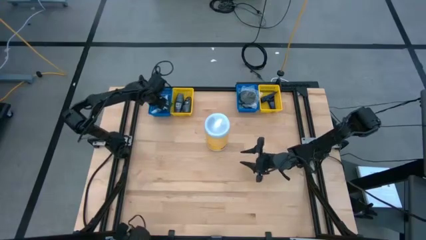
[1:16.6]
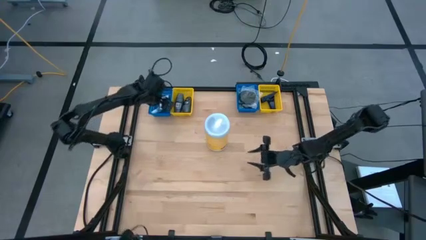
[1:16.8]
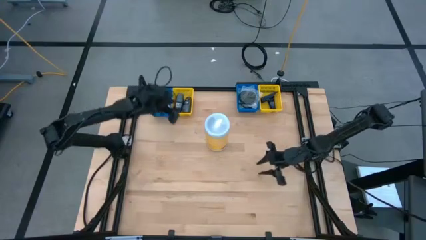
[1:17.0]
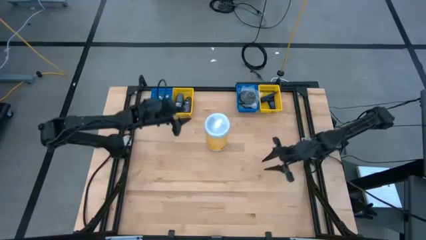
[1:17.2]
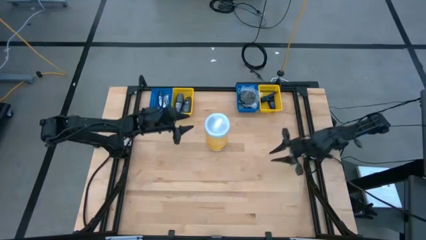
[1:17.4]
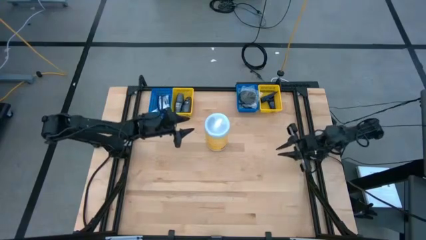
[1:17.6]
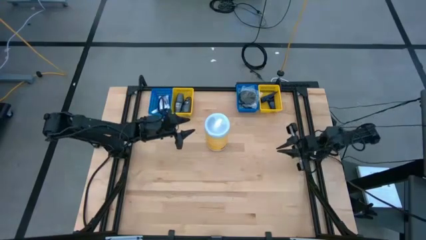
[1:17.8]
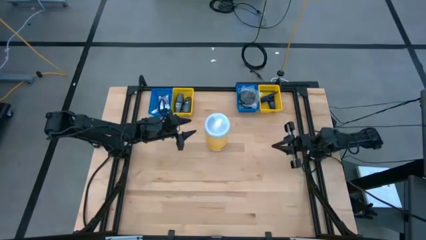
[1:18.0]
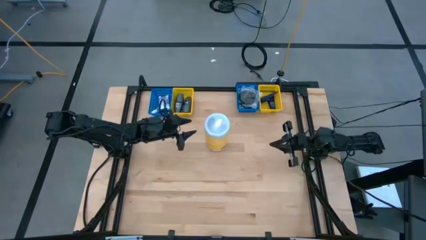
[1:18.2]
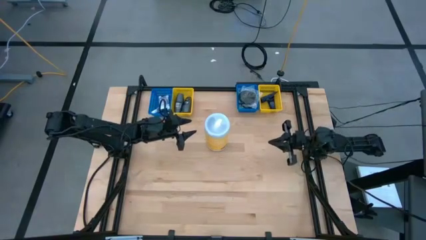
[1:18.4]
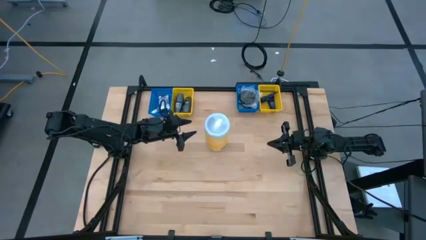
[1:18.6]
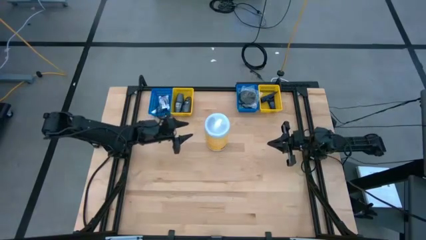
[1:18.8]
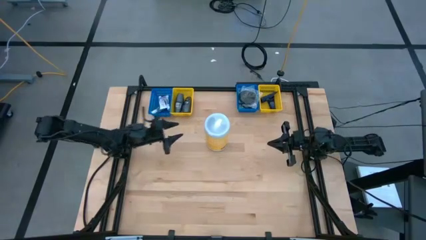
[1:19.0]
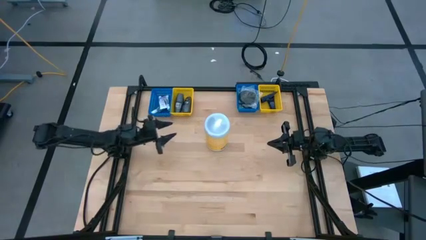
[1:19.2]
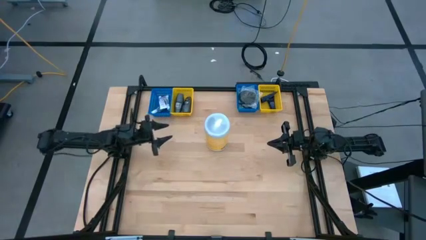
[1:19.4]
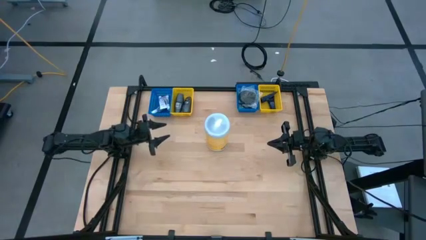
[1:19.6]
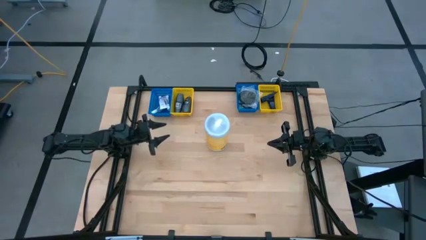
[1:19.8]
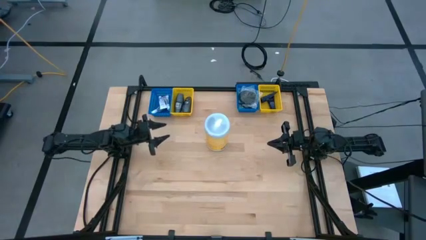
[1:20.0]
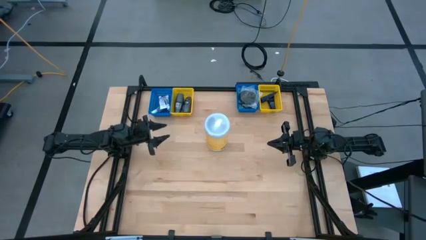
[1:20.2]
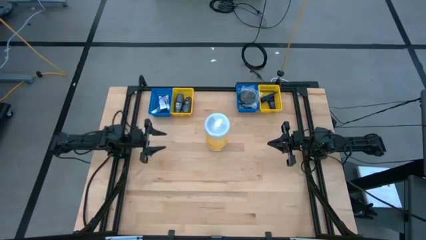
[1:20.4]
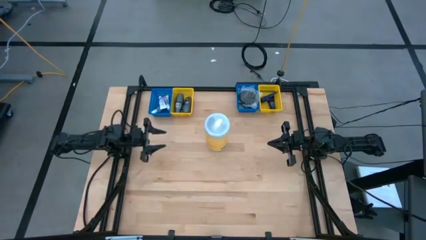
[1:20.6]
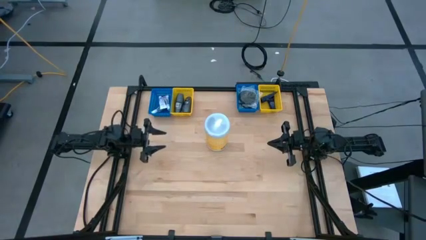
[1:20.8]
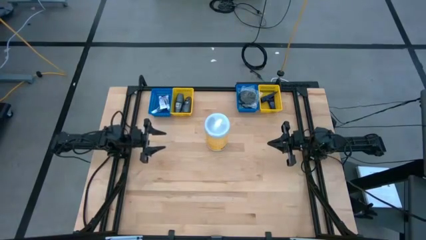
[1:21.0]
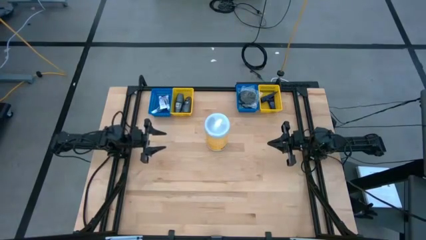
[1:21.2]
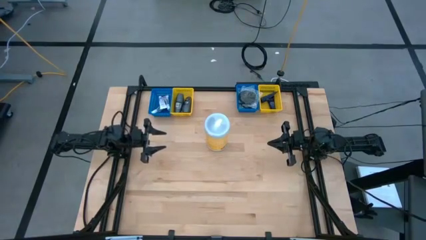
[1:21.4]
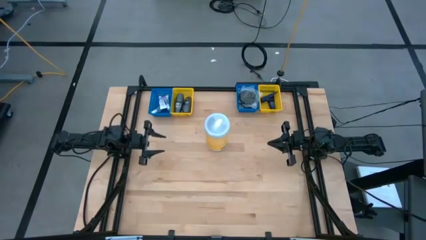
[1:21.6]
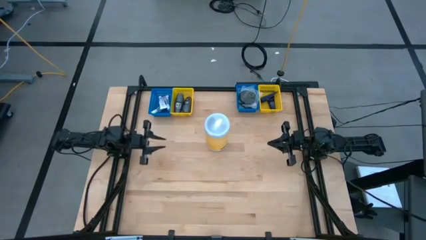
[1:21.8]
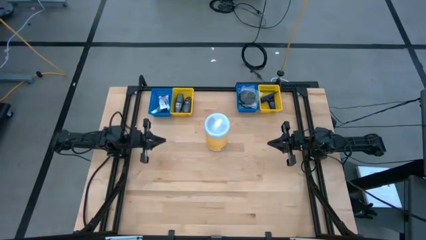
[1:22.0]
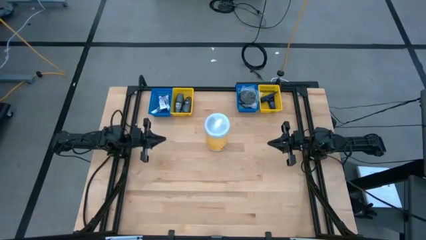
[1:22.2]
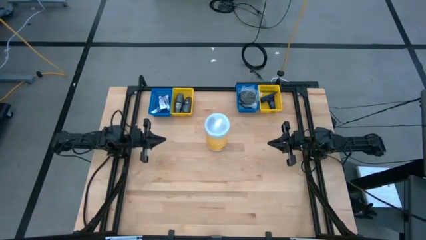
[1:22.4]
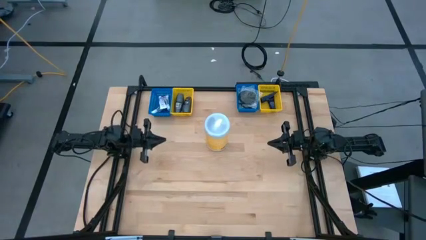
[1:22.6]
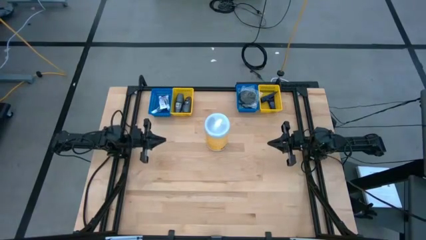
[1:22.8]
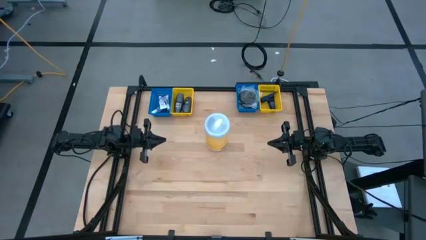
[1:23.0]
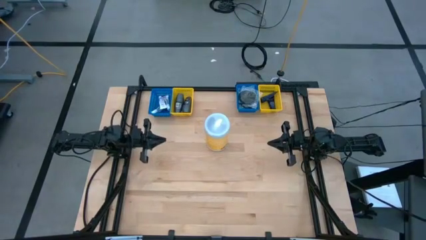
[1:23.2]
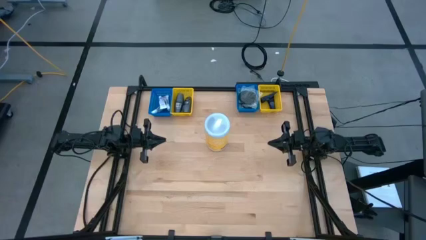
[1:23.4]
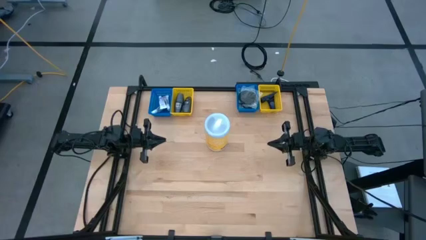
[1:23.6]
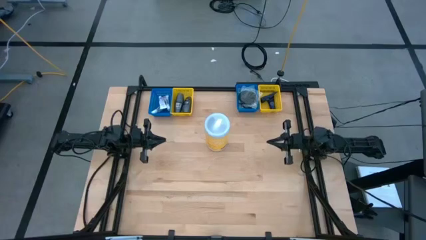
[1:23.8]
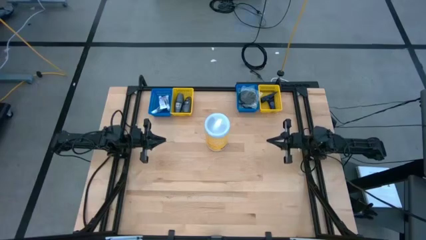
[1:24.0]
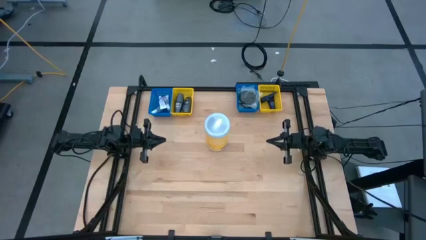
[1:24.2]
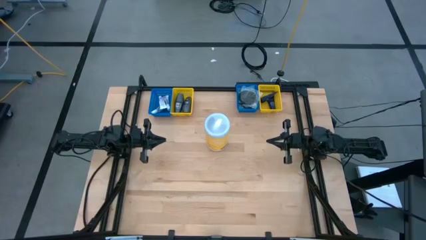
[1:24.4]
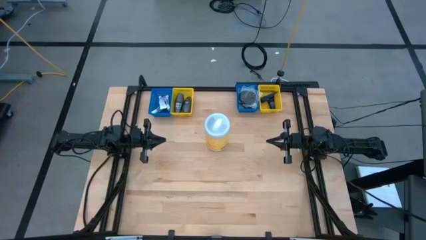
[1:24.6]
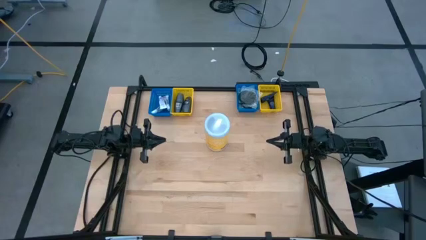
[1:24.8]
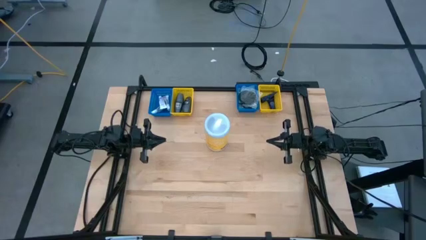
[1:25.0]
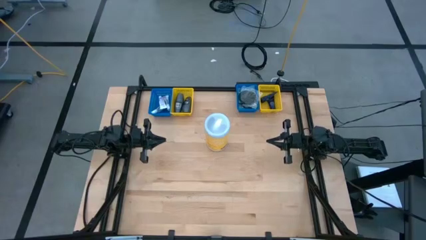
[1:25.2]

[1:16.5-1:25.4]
Task: Pick & Place Travel size toiletries
Return to Home Position

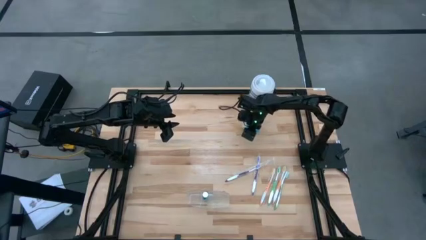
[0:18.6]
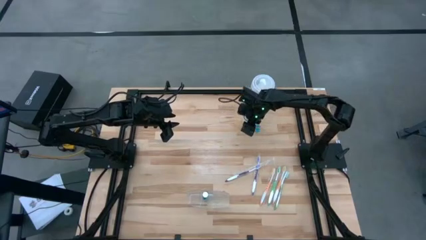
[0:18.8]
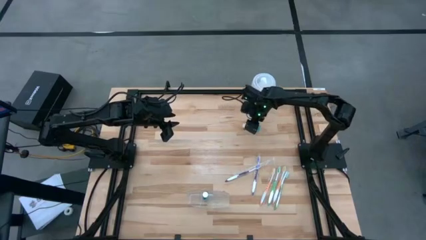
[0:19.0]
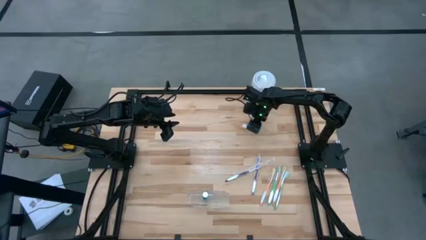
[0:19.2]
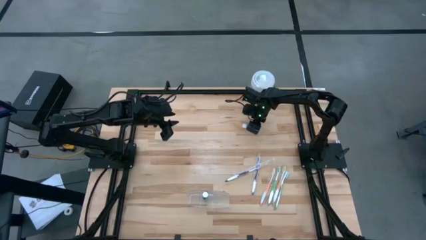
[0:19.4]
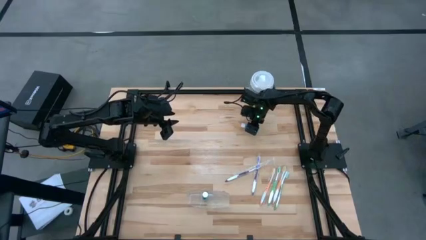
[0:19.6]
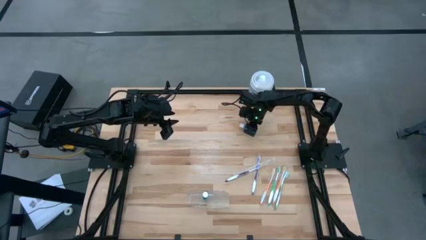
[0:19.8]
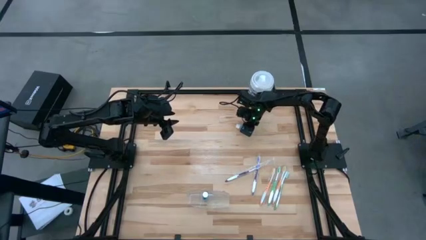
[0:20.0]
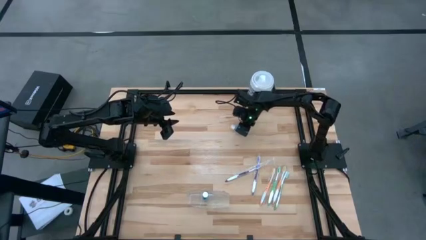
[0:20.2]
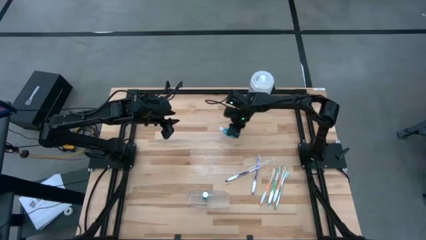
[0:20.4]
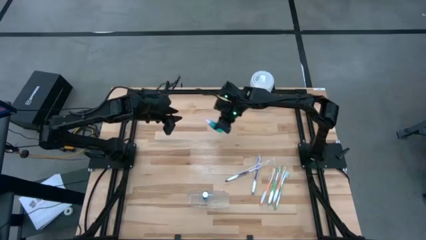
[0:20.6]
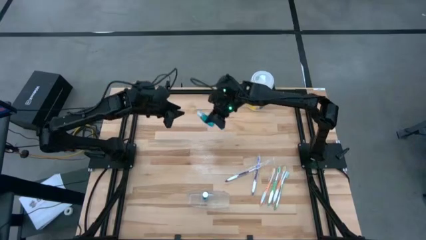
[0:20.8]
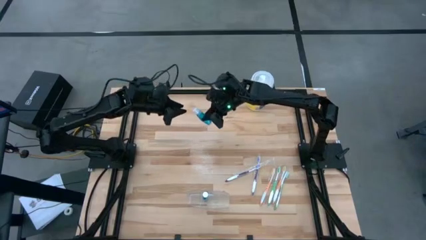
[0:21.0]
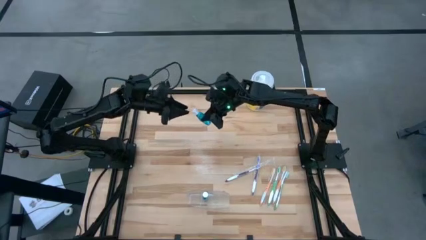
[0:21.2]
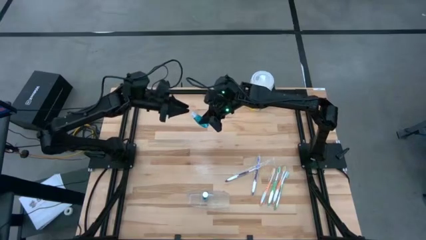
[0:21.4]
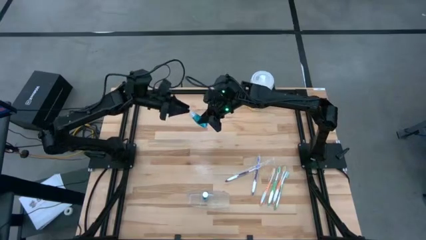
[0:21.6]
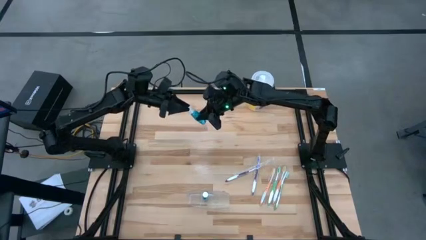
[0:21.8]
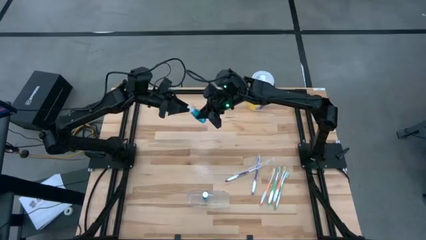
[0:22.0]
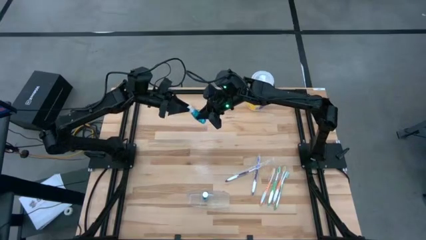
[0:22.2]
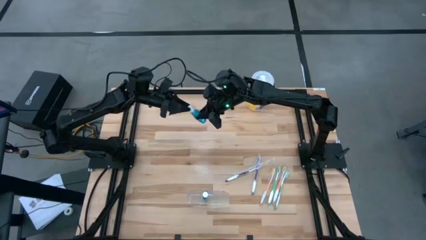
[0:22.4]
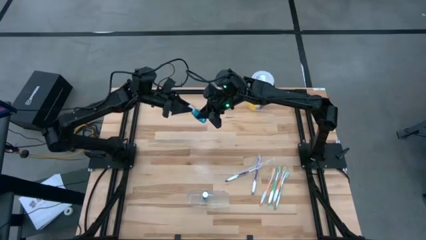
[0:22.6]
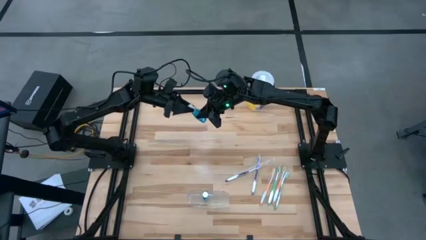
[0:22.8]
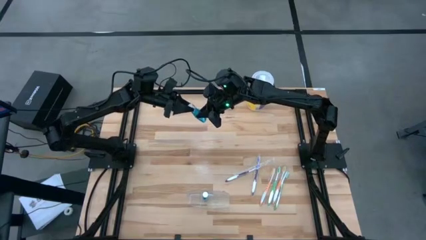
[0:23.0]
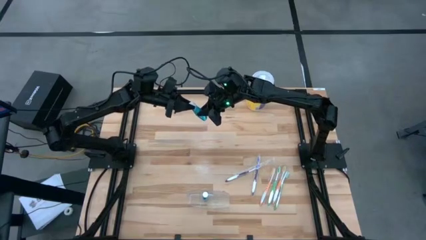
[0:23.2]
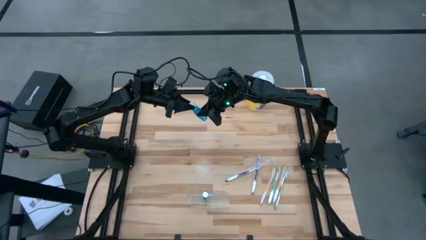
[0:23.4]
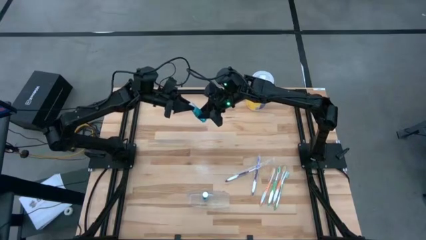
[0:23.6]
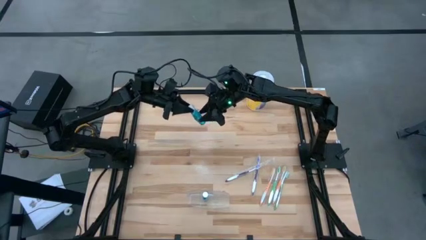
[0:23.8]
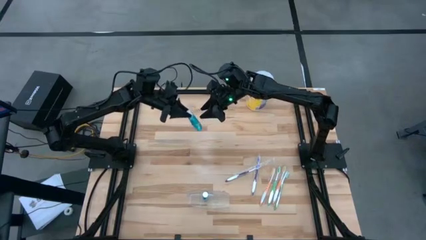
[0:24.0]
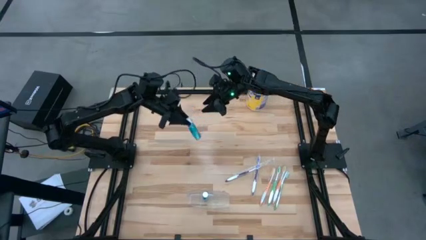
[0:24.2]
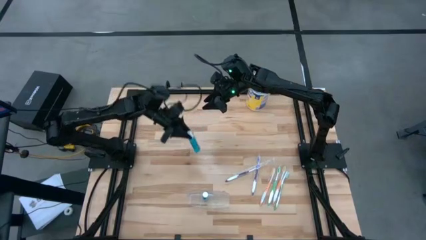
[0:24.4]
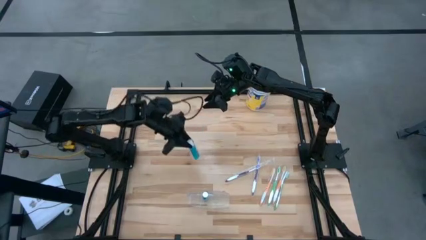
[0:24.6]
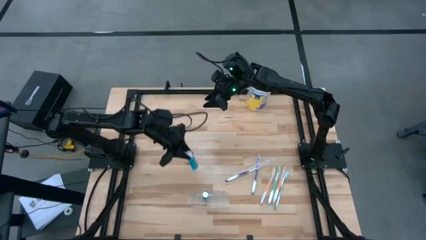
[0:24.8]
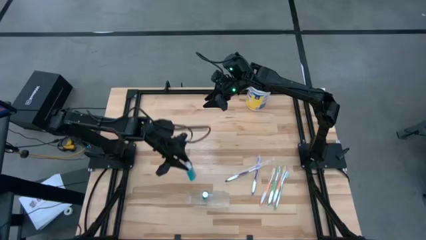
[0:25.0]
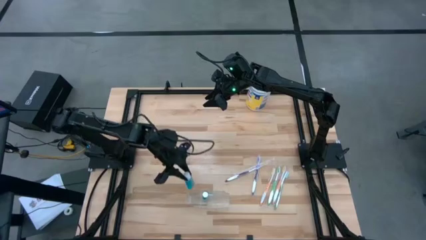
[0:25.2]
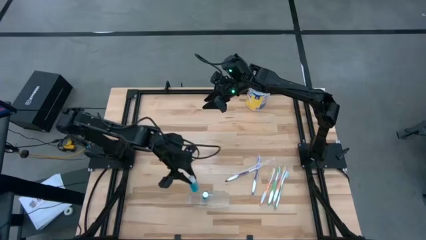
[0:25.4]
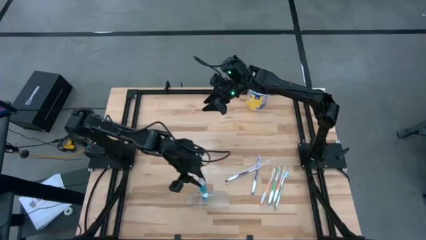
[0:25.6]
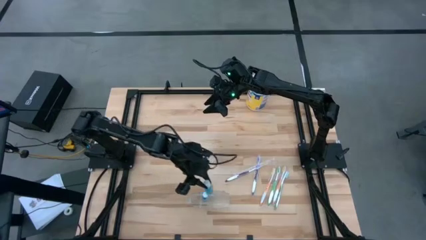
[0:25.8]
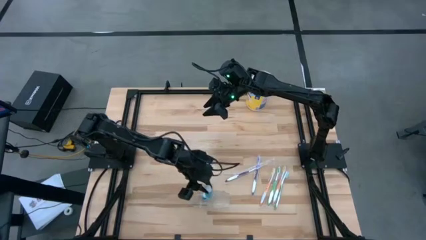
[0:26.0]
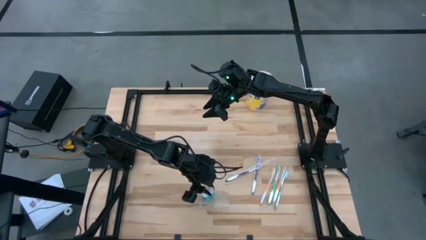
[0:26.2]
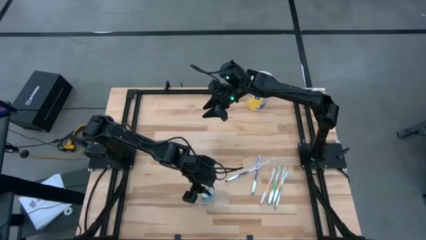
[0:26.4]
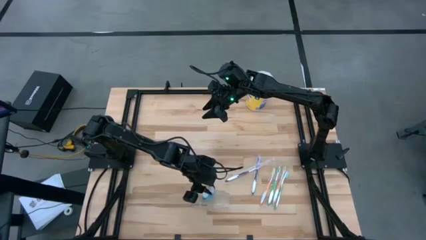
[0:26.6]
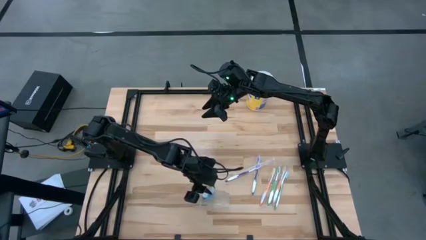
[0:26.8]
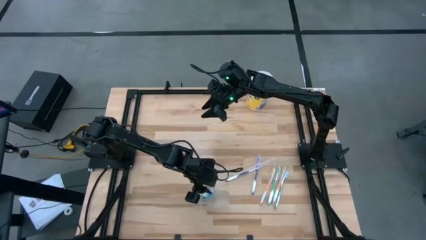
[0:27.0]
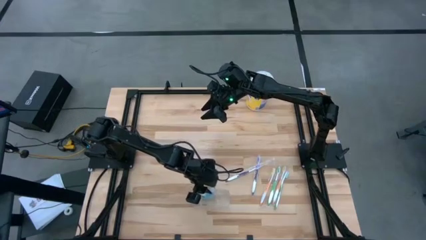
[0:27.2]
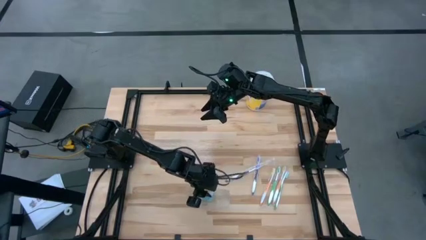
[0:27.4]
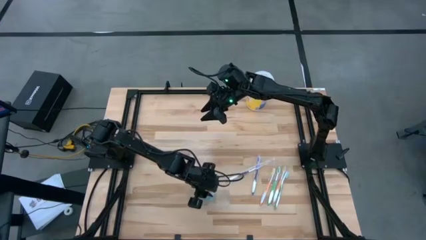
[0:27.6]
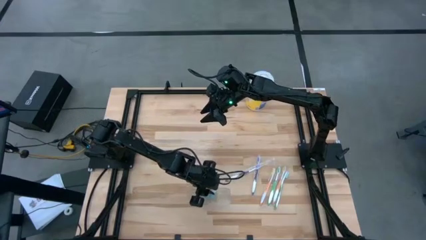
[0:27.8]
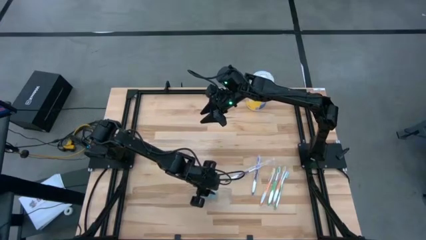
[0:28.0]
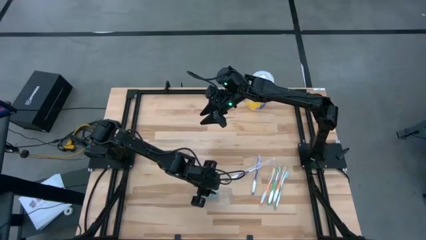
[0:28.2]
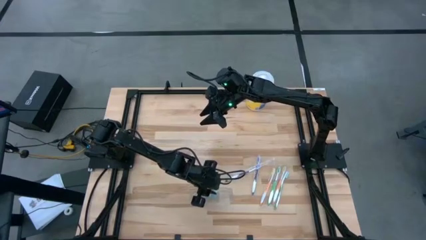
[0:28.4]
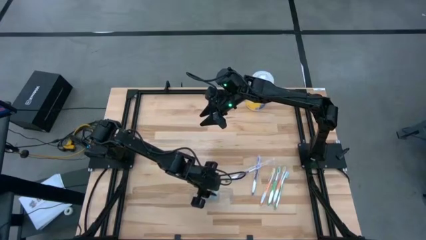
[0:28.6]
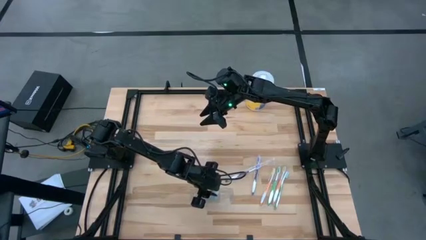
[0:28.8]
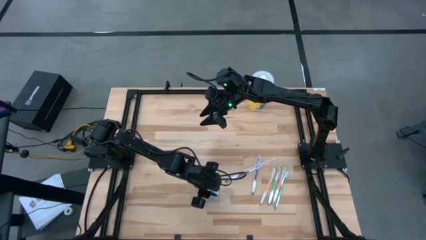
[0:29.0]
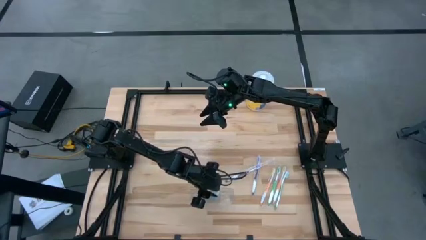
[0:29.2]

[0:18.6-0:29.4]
Task: Pick & Place toothbrushing station
Put the mouthwash into the transparent organizer
